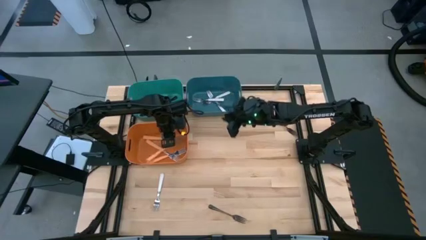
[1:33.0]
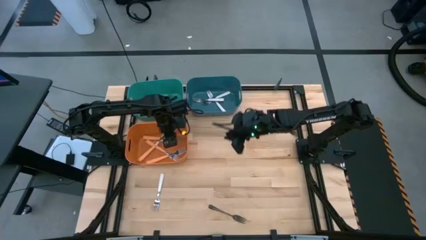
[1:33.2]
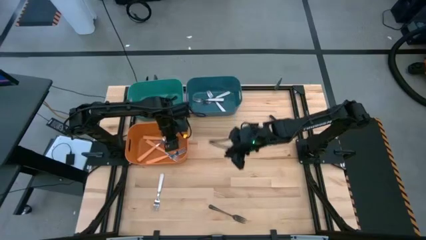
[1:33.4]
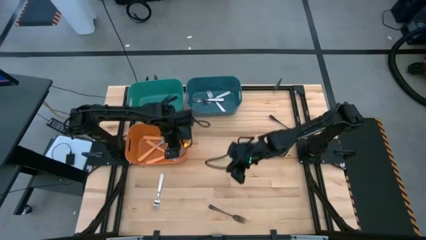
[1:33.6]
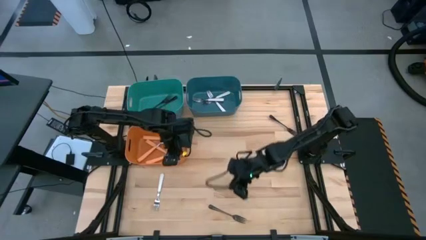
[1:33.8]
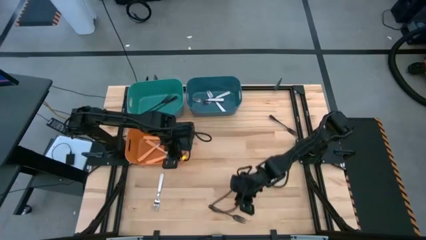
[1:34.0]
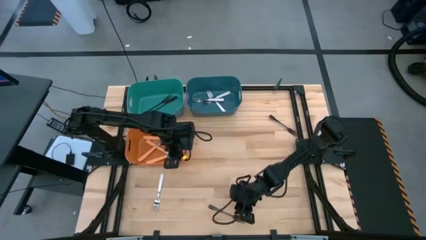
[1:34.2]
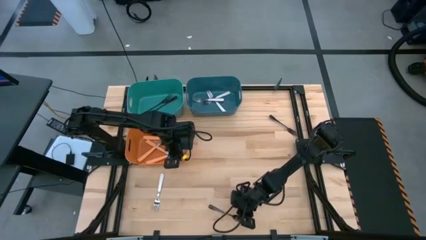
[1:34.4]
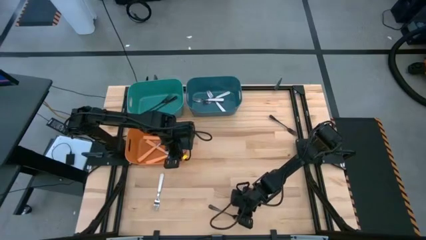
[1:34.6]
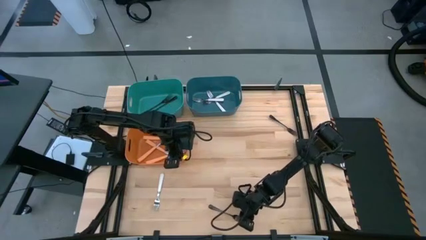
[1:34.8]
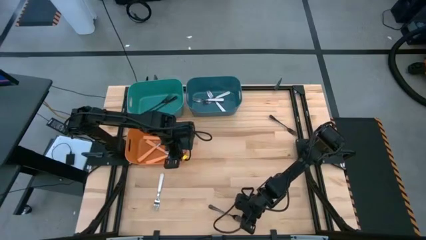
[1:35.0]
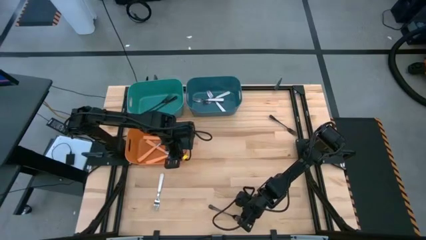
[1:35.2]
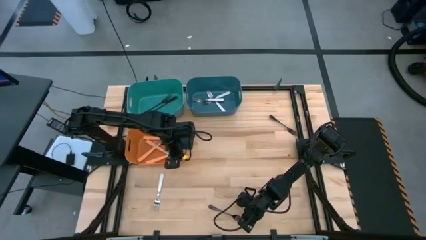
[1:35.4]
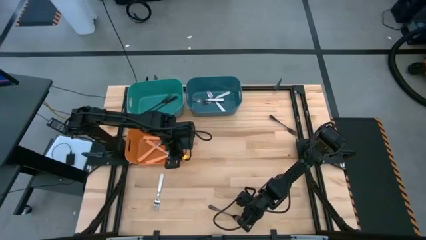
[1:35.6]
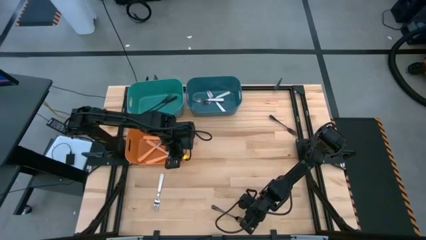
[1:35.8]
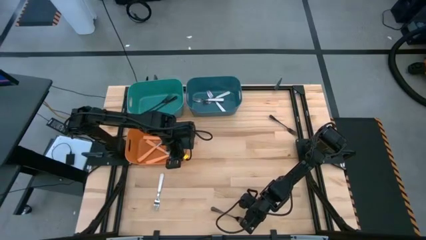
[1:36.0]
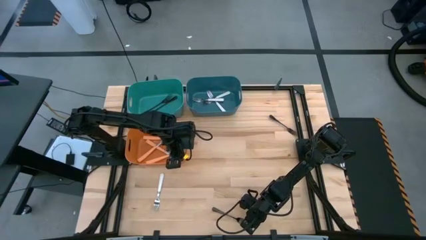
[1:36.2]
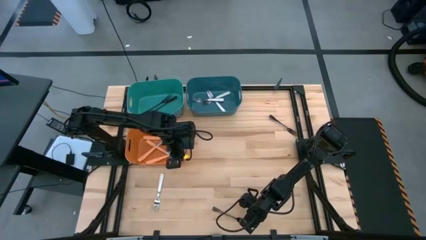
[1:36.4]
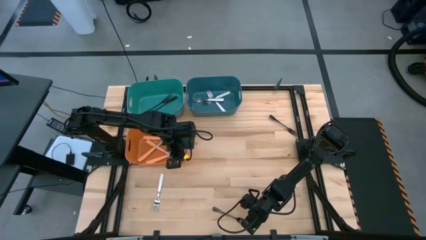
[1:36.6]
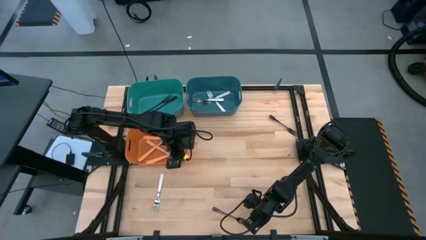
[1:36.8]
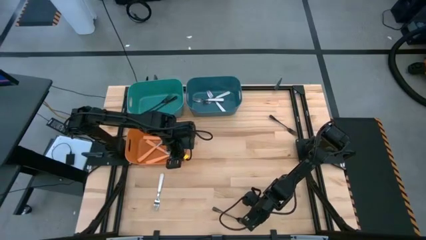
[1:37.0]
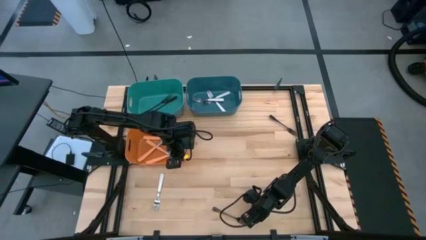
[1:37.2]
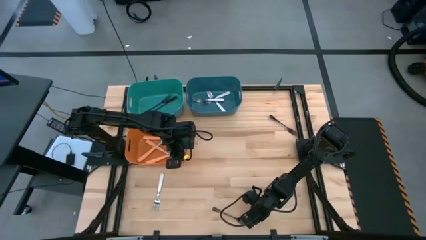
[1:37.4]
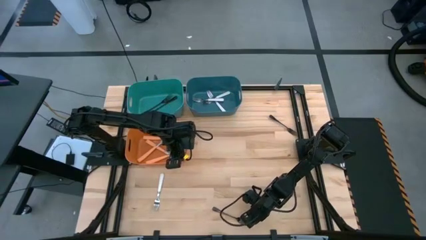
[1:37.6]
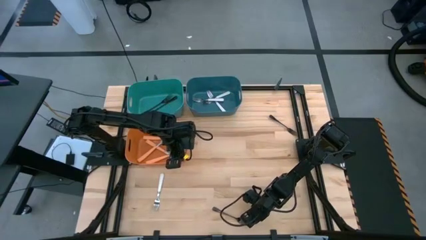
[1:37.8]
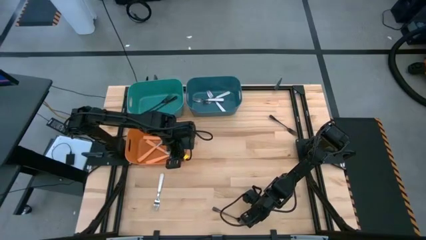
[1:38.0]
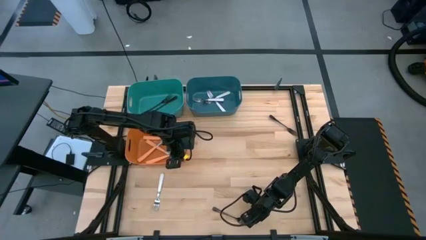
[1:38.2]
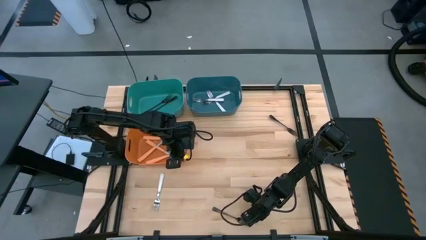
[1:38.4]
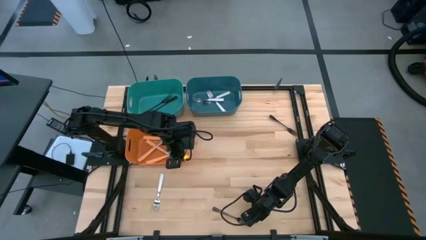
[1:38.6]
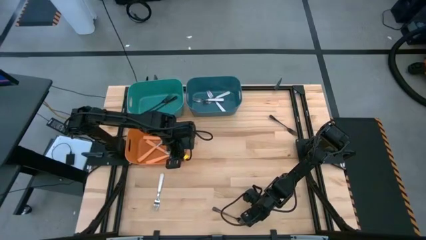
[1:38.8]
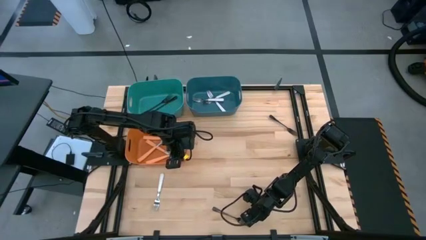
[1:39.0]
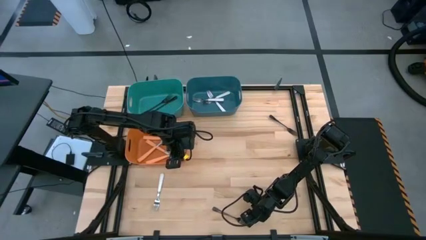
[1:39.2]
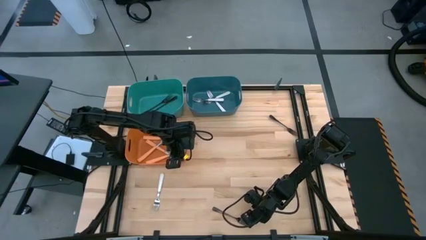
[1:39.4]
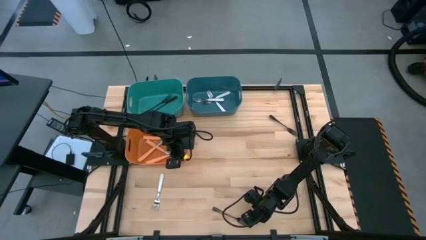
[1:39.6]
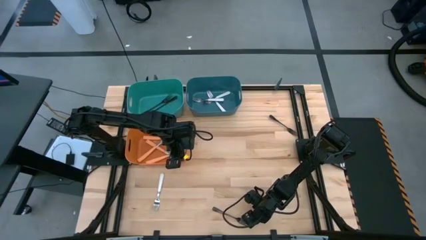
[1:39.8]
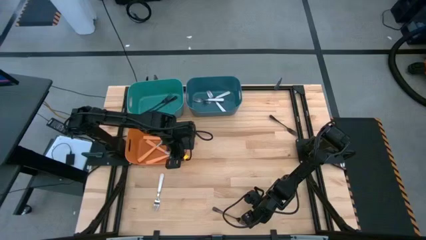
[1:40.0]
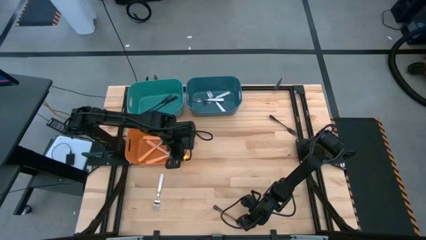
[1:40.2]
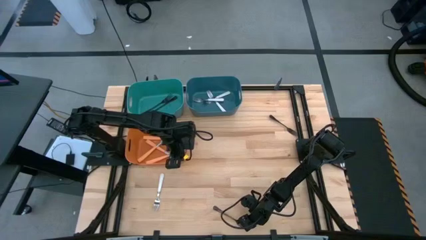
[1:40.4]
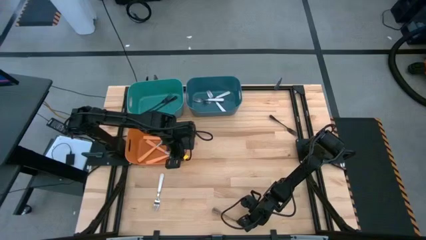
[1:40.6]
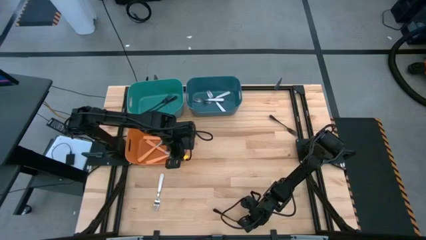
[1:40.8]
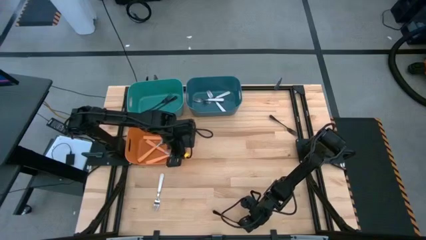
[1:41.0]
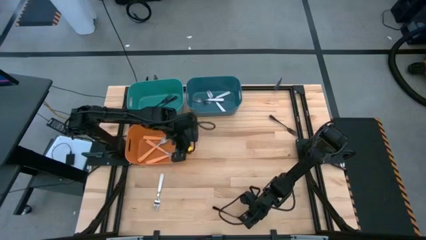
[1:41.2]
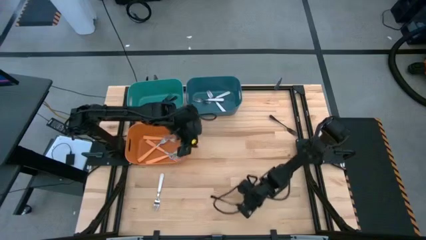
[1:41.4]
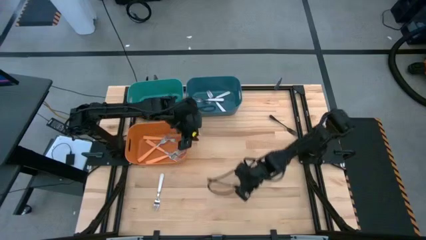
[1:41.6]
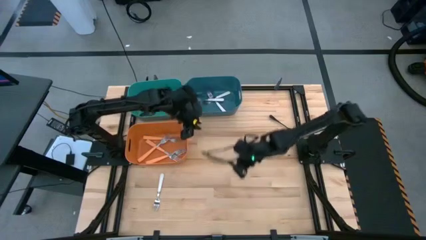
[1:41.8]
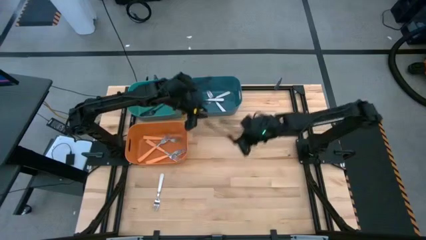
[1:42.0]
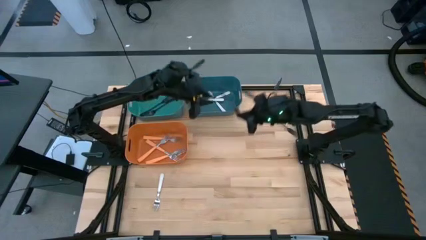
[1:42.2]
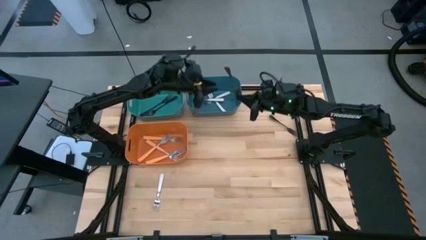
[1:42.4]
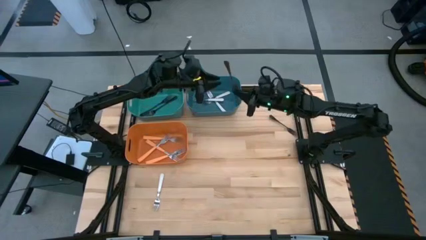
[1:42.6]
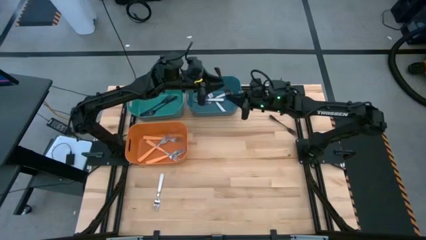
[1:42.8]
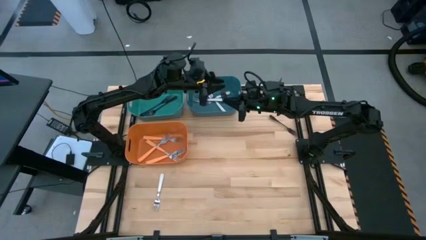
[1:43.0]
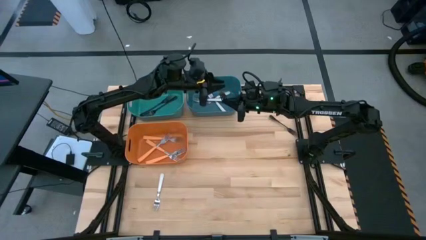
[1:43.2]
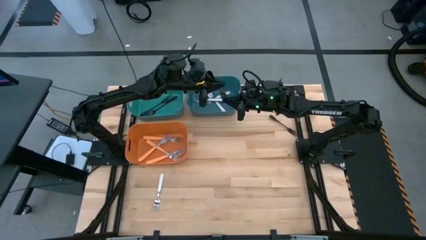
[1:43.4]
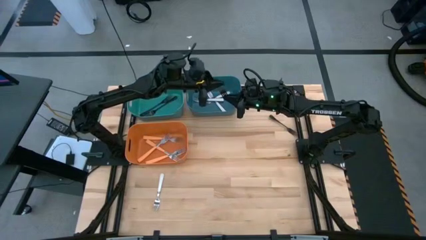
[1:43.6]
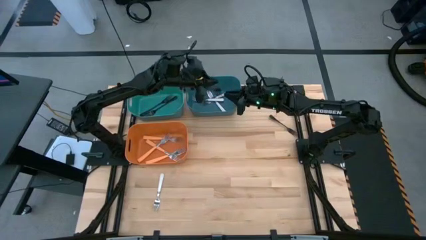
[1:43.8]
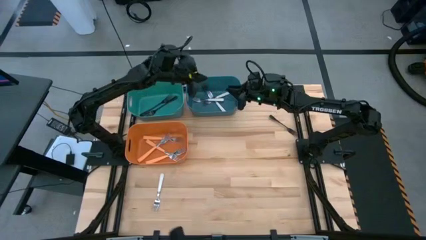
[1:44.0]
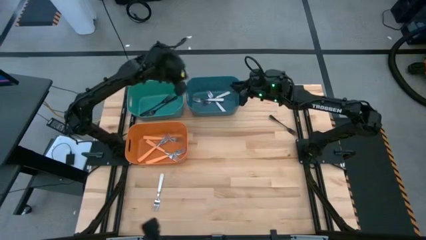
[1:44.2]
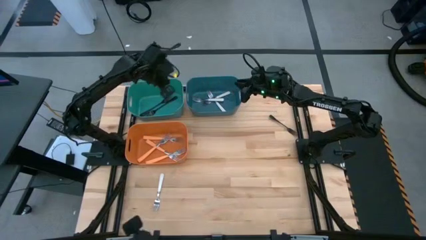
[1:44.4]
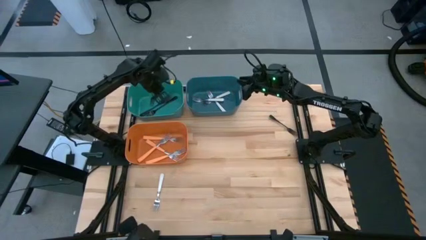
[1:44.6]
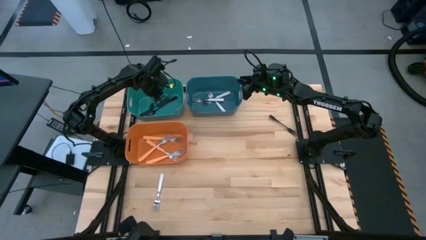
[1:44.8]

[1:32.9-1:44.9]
Task: Sort silverware by color (type)
Put the black fork into the green bin

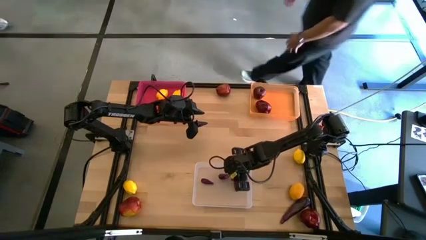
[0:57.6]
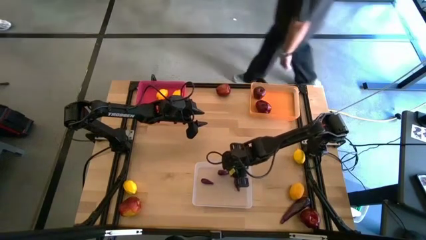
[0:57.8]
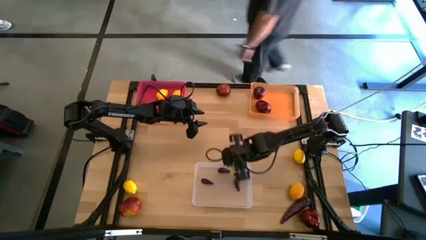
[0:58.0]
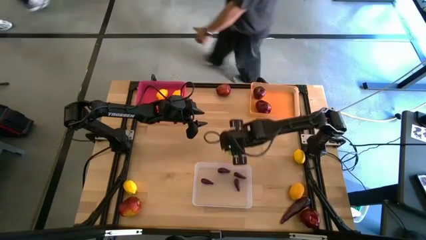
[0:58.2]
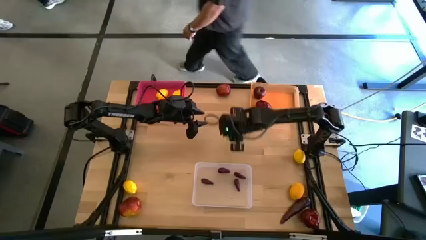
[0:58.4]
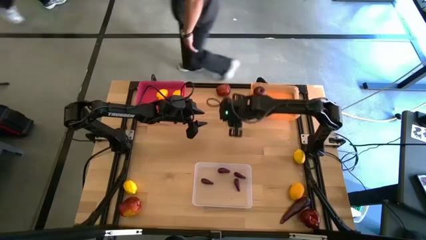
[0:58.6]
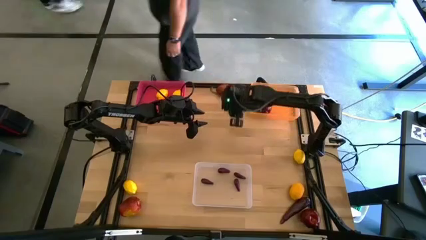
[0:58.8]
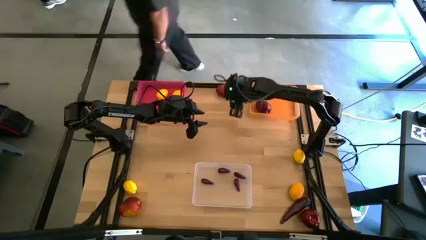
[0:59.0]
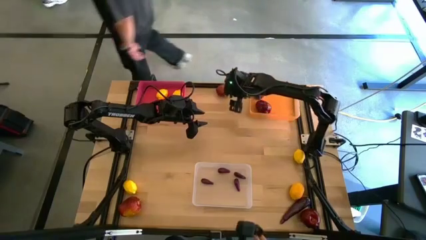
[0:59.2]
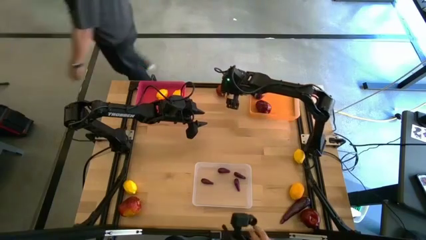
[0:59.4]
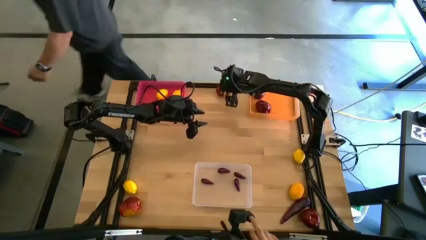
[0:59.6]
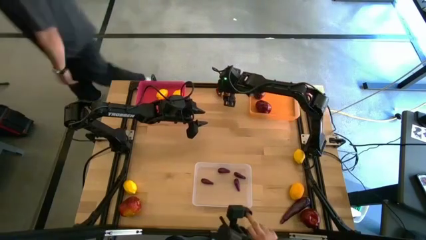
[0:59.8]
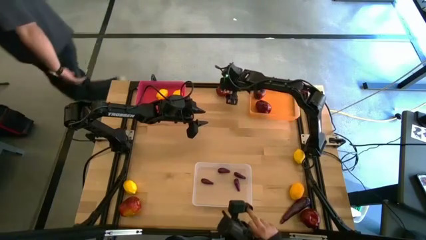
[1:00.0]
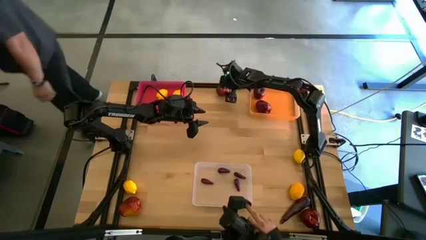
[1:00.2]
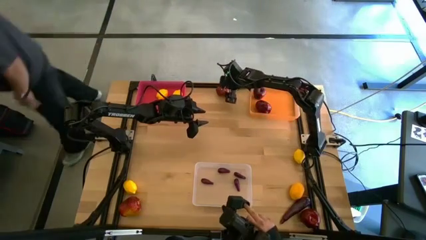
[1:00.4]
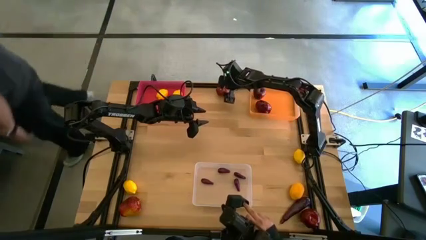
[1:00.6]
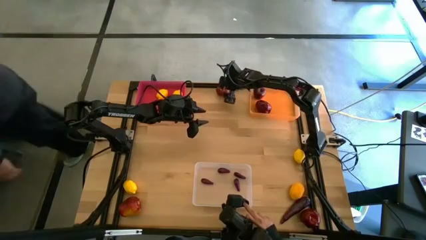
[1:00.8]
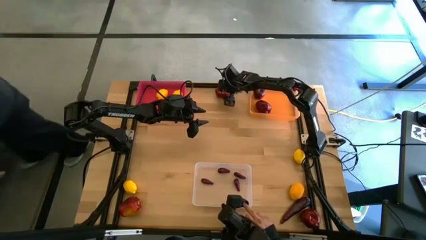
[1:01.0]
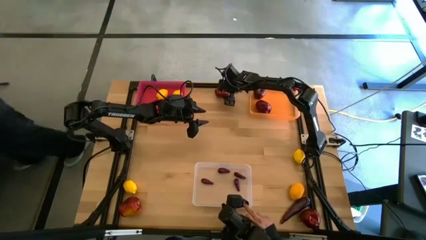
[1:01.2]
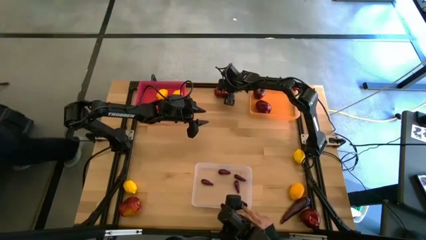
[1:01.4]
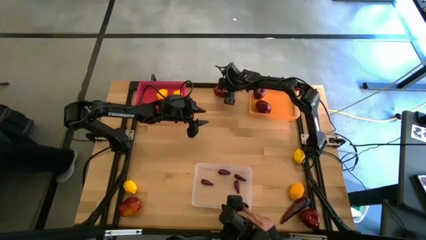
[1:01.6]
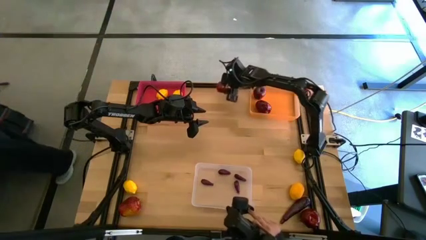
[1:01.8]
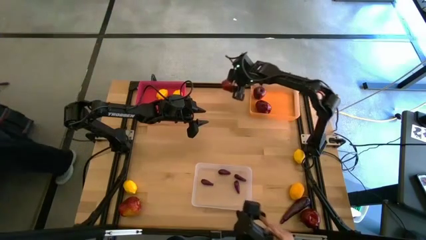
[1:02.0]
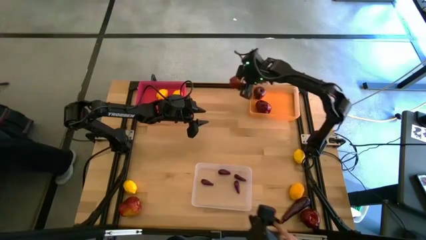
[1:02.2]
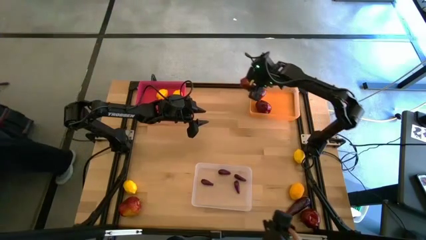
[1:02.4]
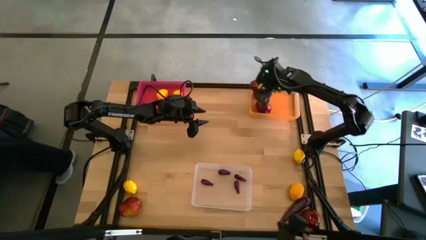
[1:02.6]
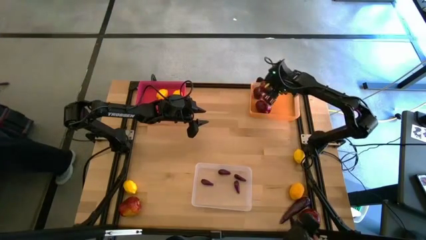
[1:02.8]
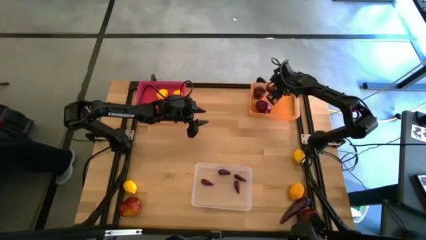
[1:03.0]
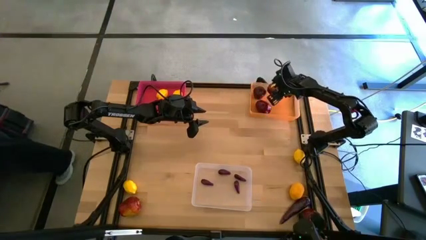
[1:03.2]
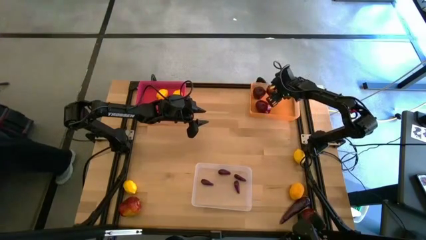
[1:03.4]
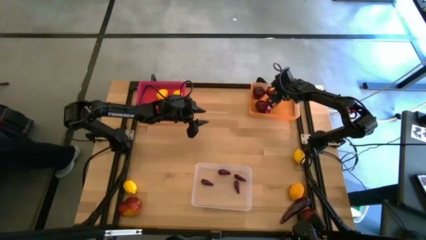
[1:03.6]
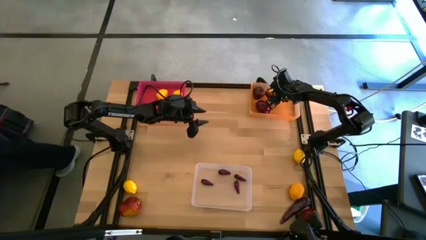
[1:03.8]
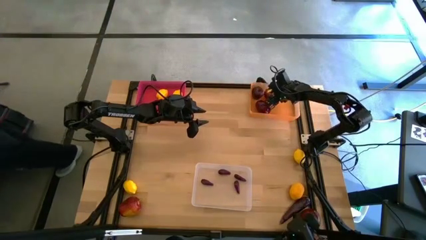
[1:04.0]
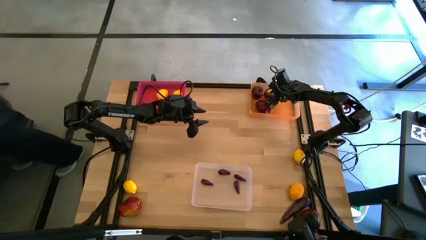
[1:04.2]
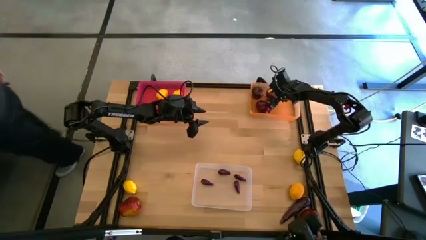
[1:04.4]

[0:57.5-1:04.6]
Task: Sort produce into baskets
Put the apple into the orange bin
